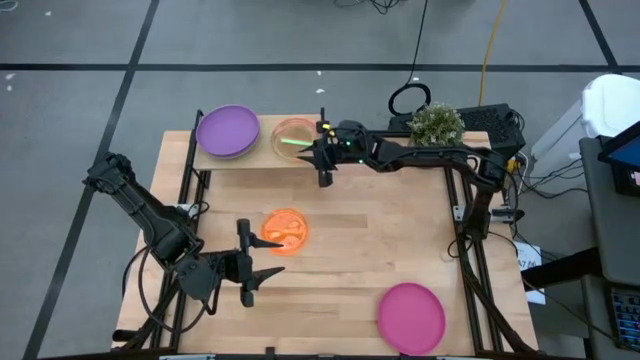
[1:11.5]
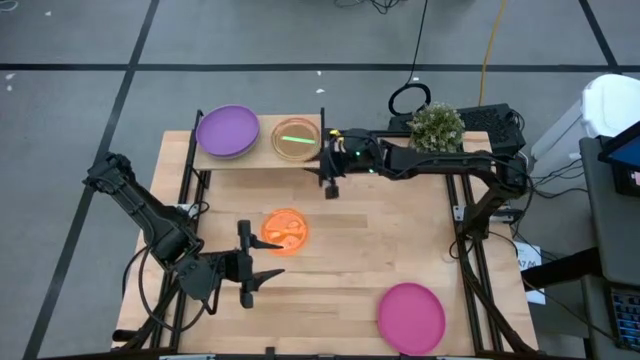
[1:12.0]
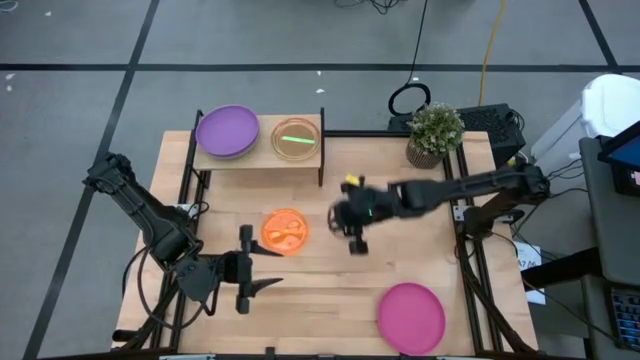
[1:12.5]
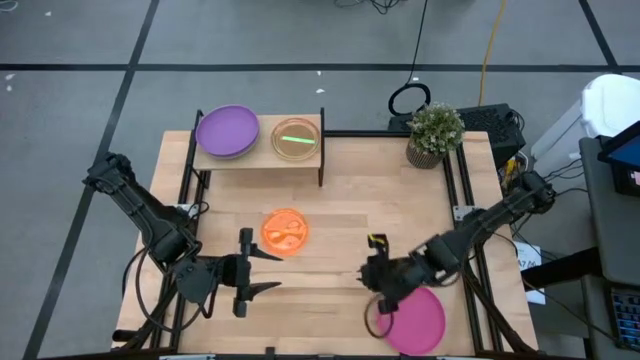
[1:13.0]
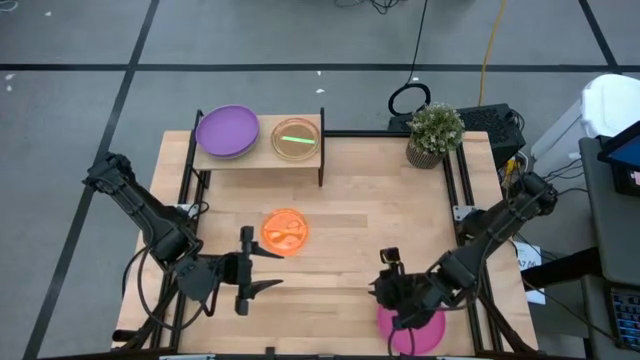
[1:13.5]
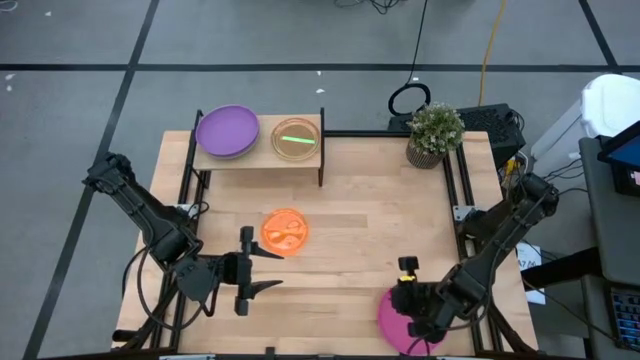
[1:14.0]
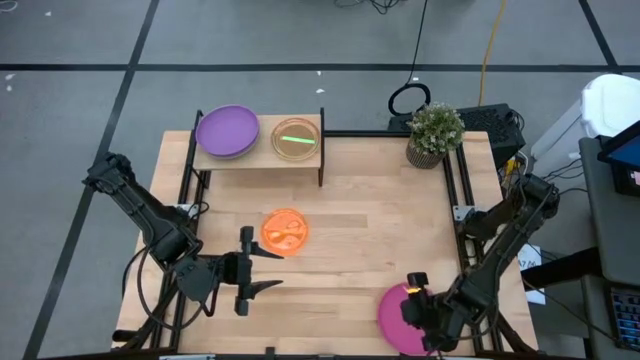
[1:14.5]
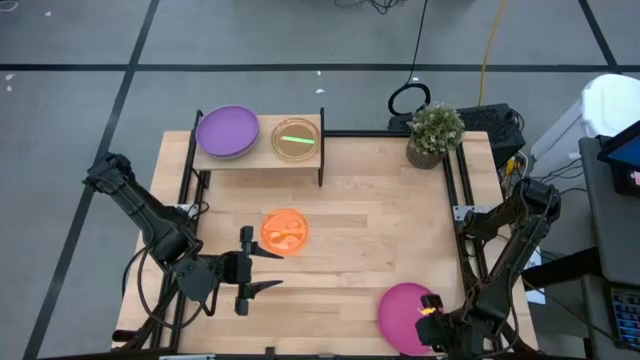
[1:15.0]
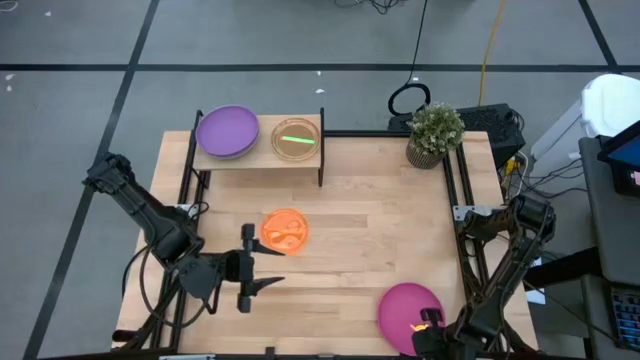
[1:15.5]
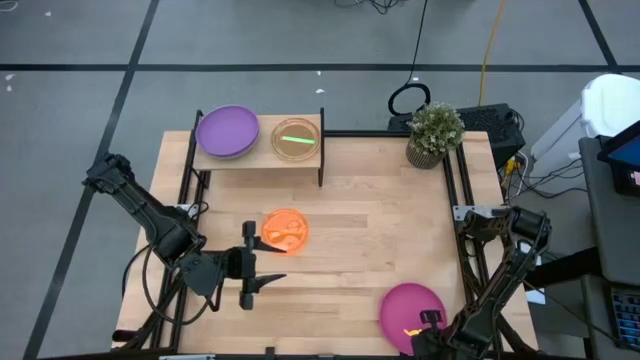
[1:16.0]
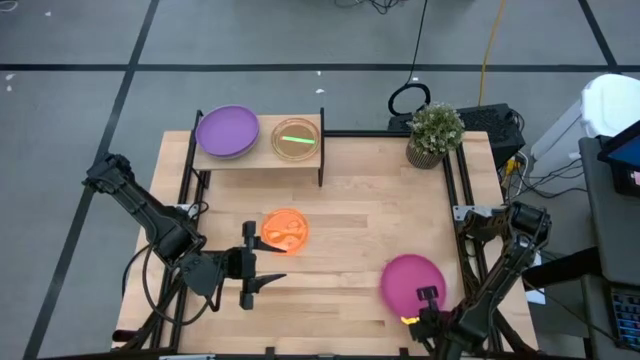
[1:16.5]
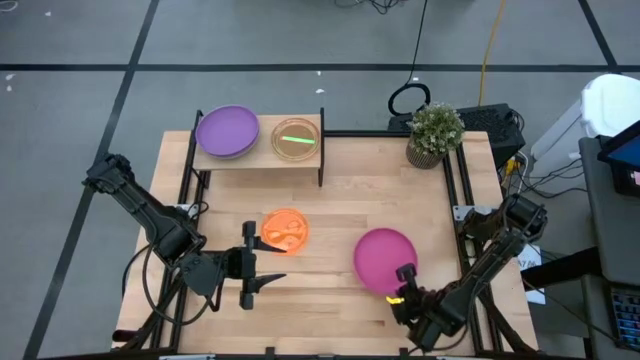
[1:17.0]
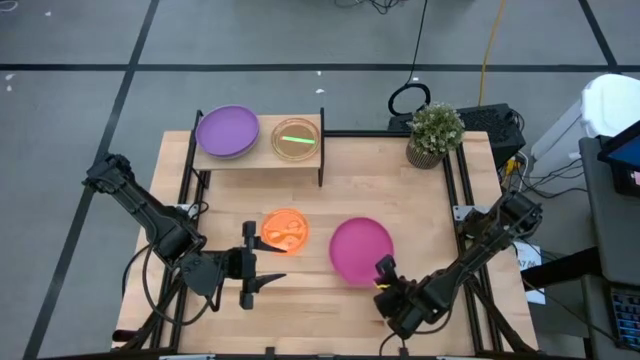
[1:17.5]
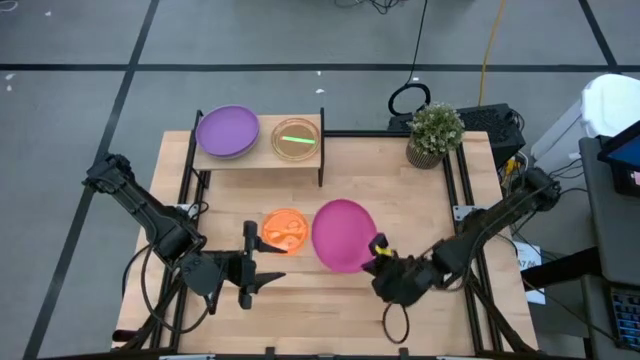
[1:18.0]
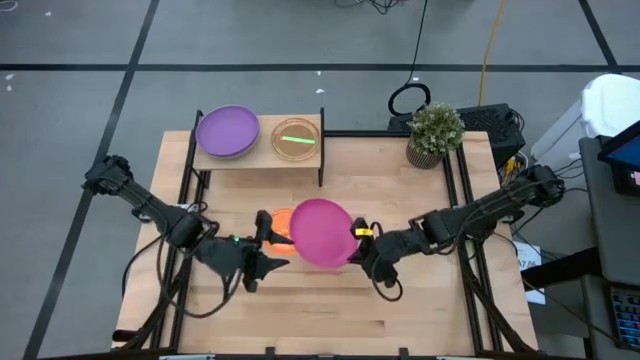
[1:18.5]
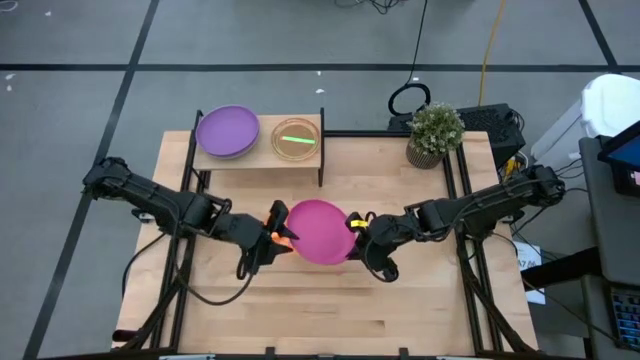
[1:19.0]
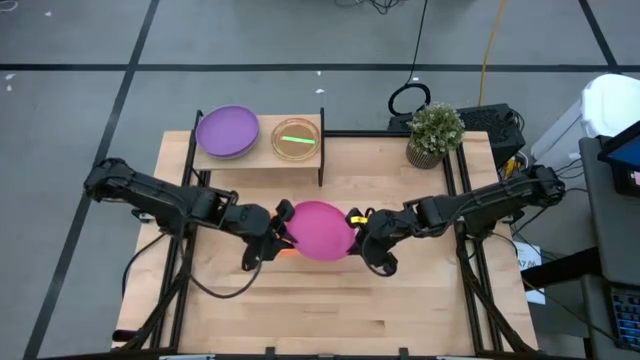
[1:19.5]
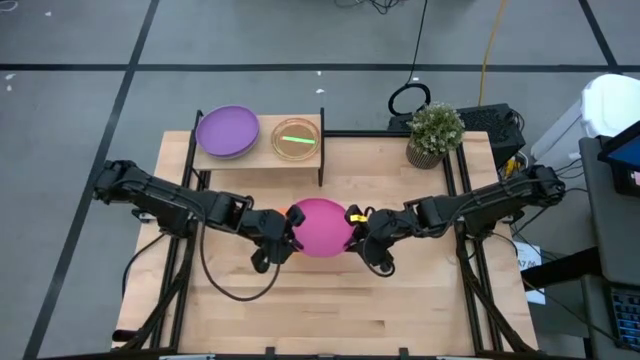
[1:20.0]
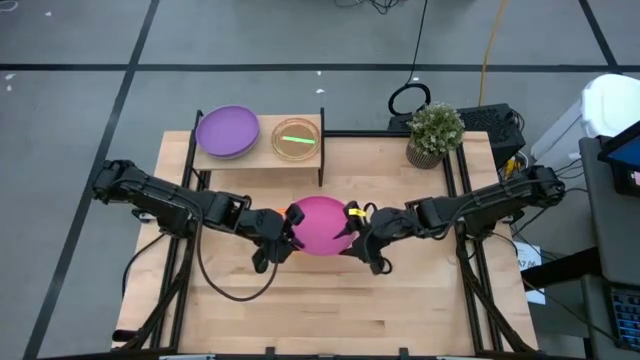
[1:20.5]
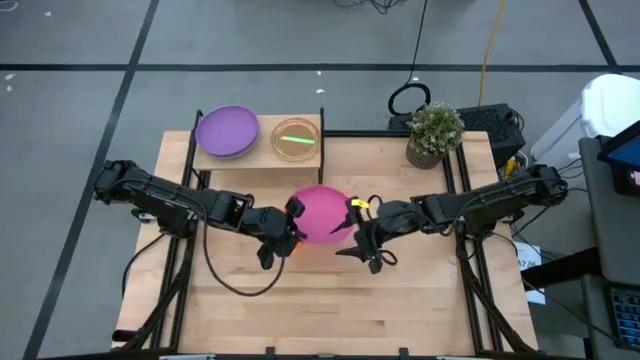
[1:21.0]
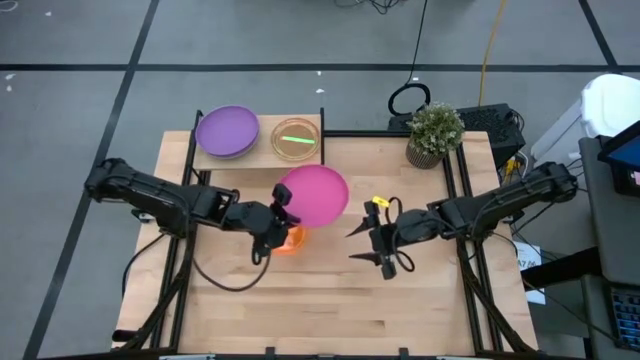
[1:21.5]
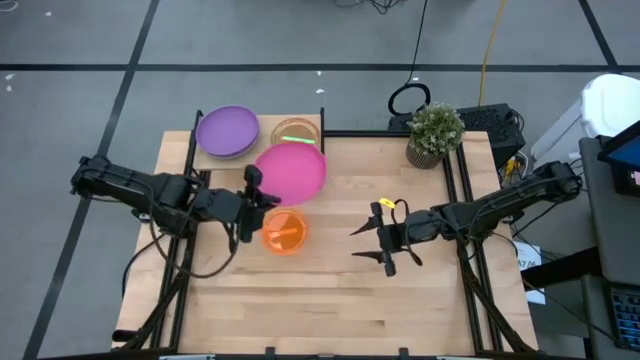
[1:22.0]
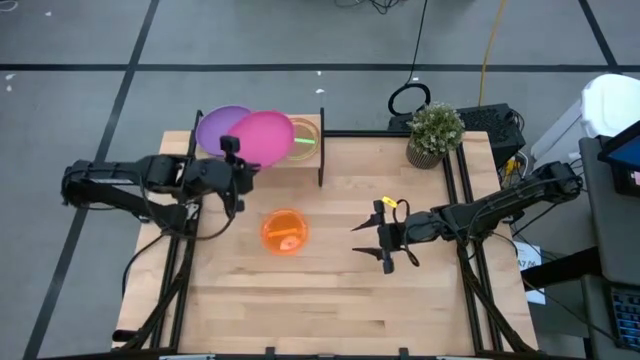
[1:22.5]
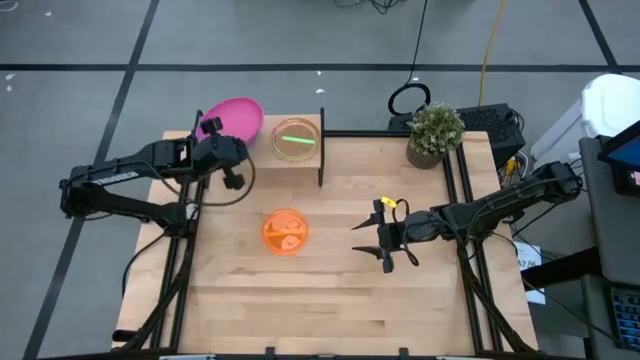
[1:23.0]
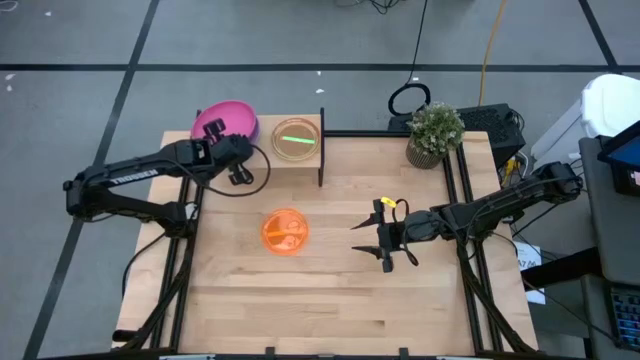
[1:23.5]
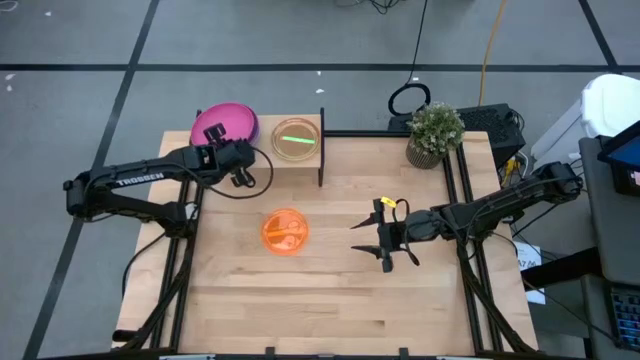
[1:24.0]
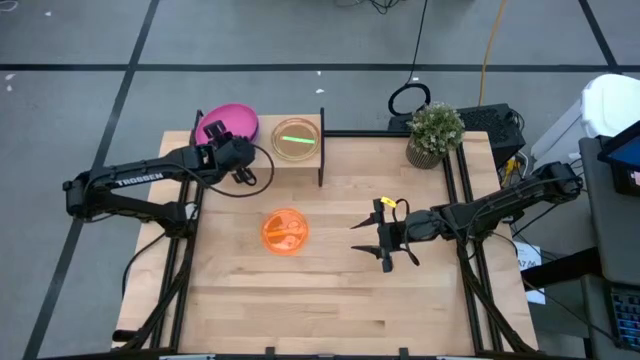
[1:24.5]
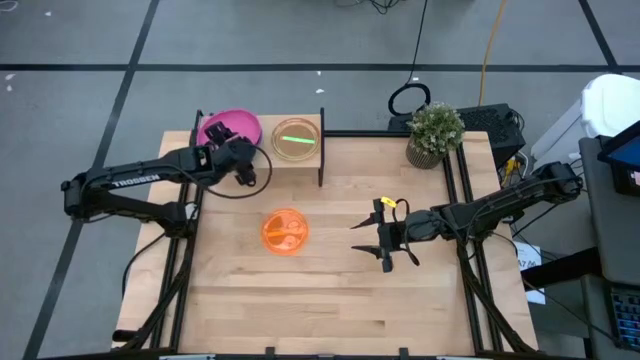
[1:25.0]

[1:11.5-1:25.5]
Task: Place and stack plates onto a shelf
Stack the pink plate on top of the purple plate on the shelf

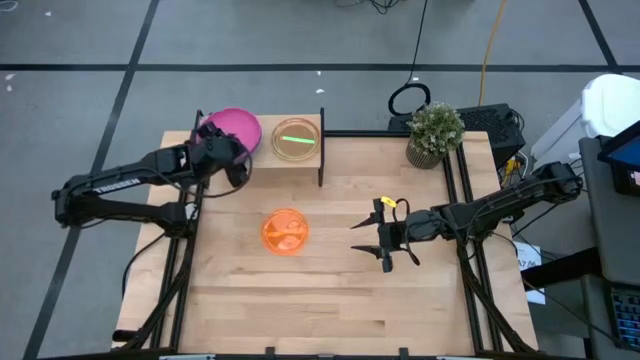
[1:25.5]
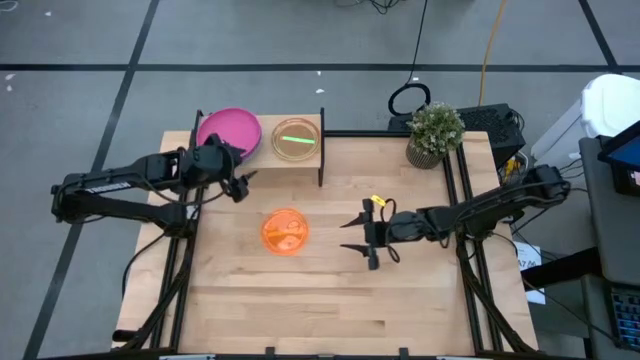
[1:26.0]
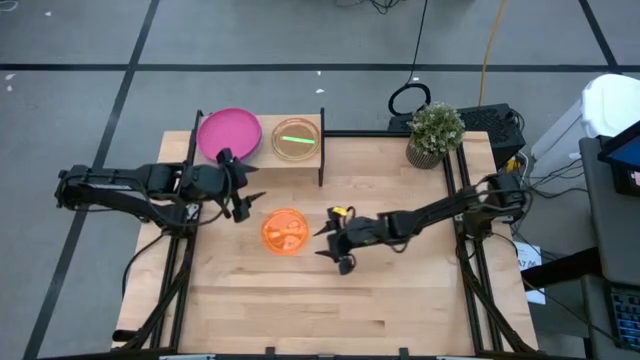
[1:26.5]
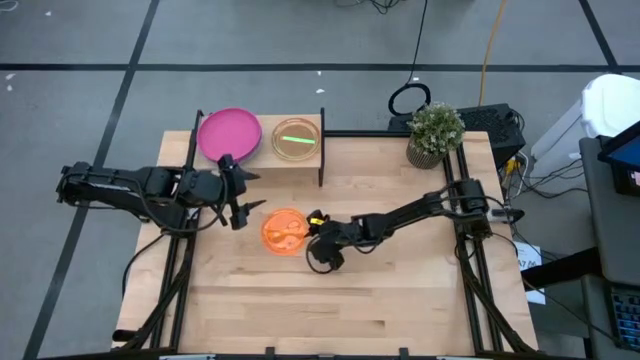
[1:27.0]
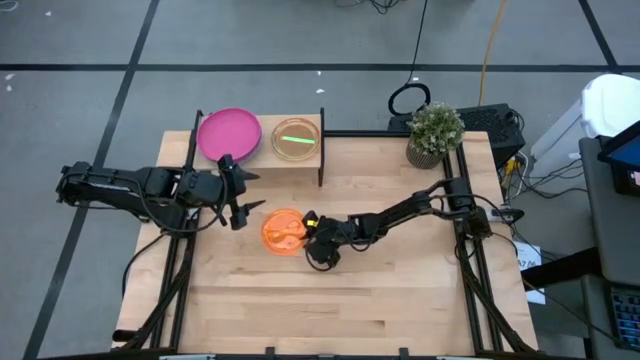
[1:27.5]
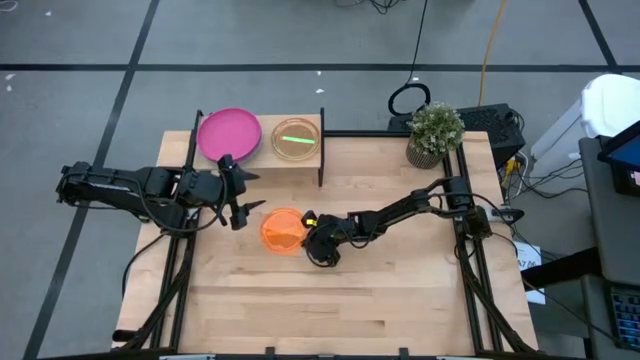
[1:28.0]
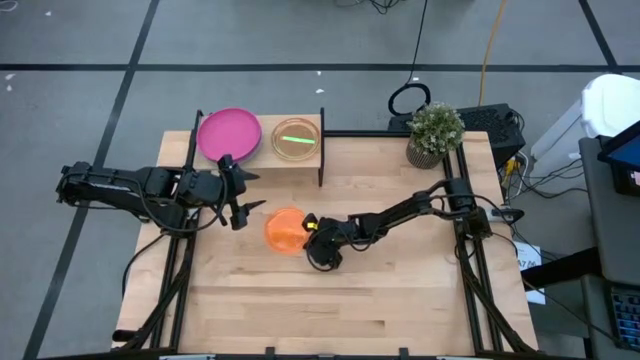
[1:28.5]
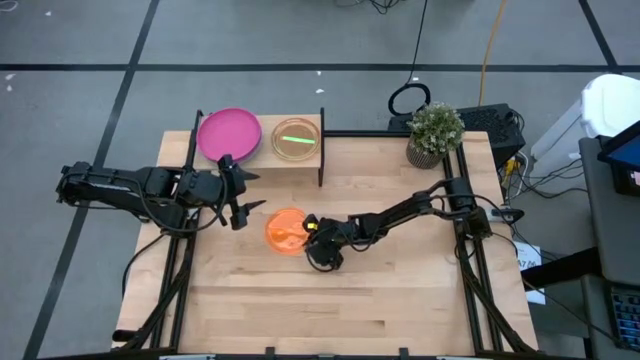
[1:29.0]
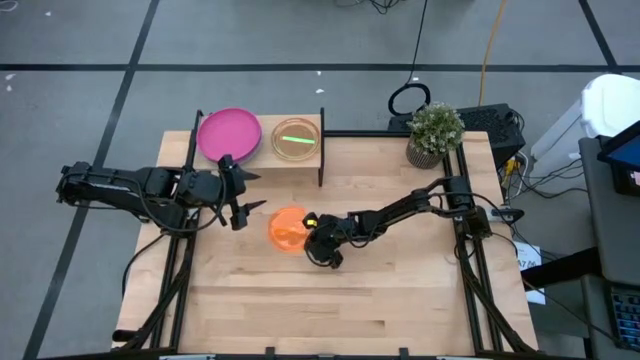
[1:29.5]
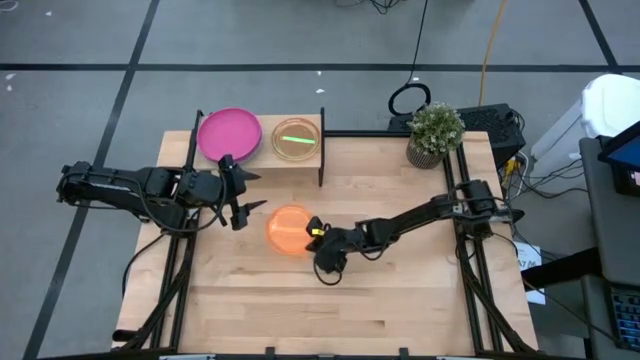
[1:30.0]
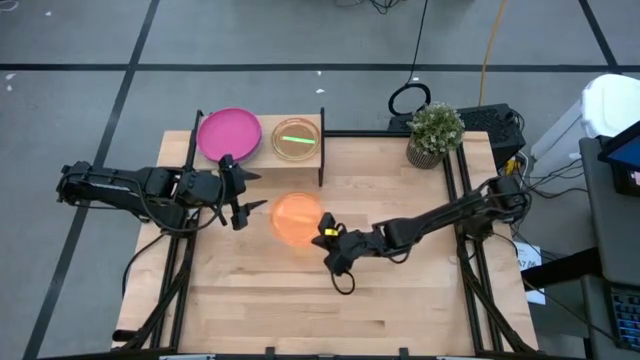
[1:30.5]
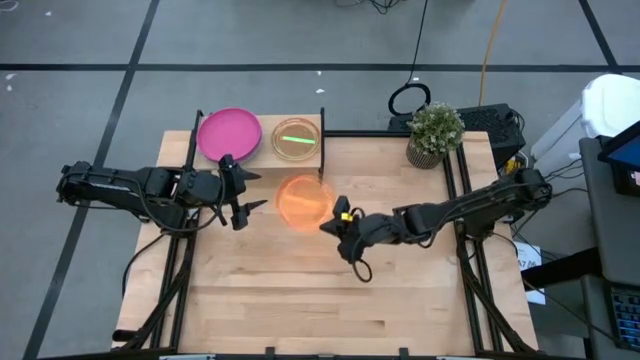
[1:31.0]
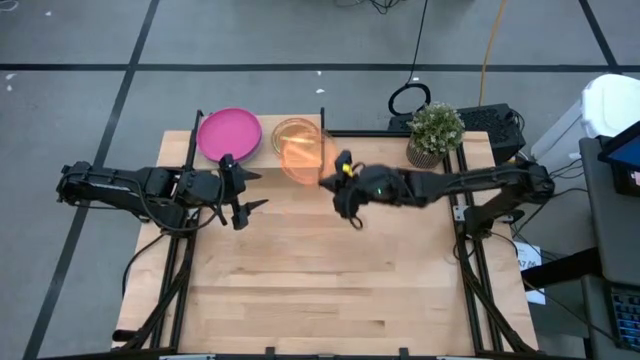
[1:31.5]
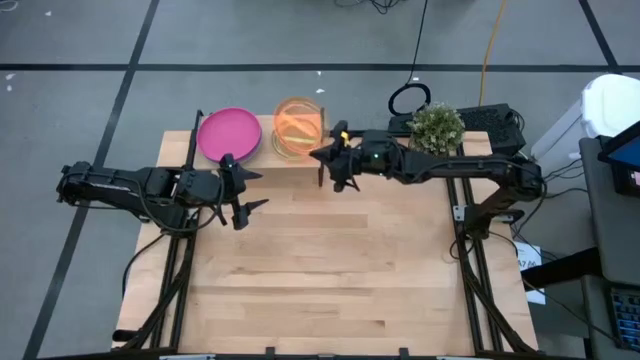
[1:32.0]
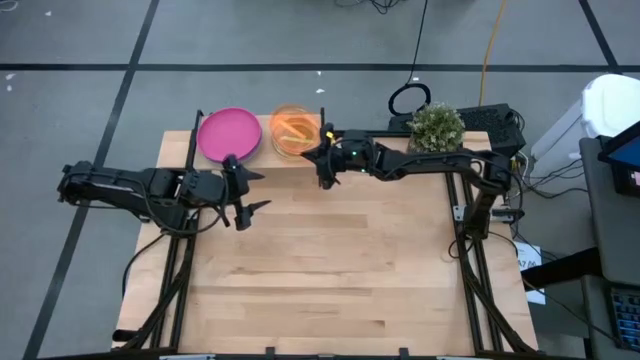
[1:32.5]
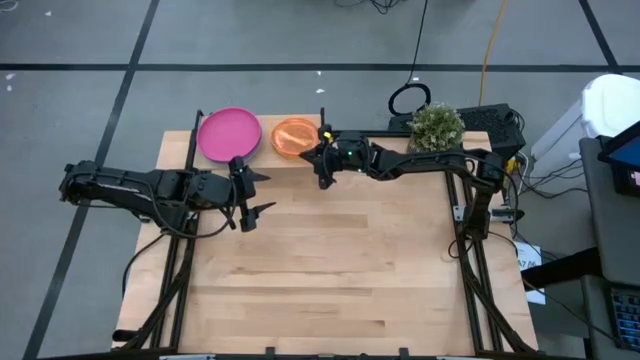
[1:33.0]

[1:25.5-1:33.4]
Stack the transparent orange plate on top of the transparent green plate on the shelf
